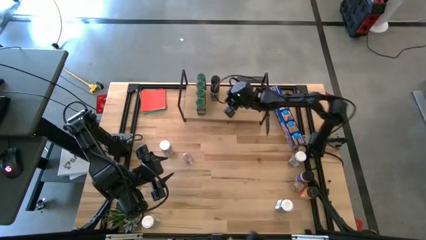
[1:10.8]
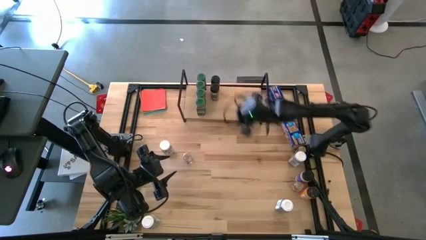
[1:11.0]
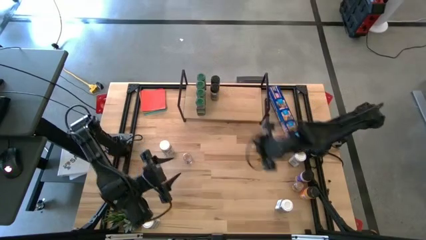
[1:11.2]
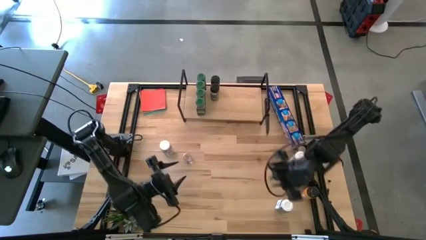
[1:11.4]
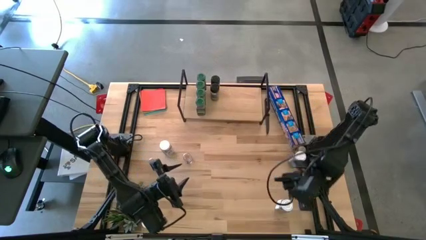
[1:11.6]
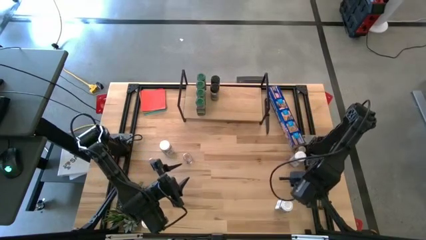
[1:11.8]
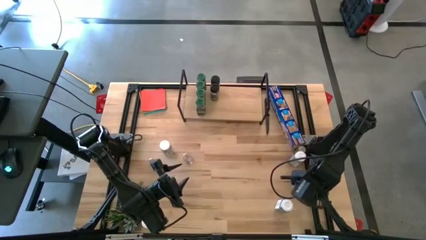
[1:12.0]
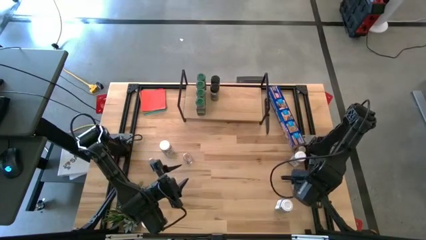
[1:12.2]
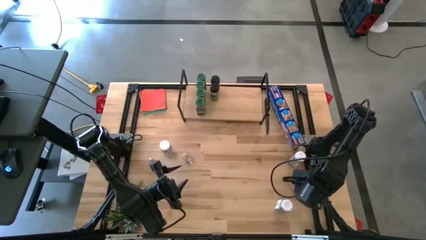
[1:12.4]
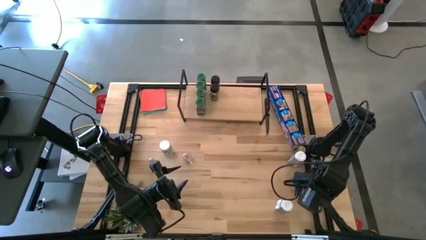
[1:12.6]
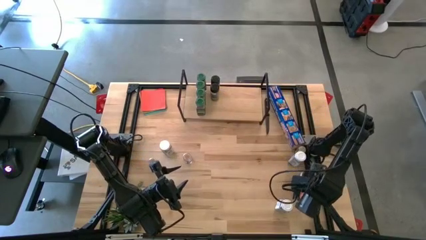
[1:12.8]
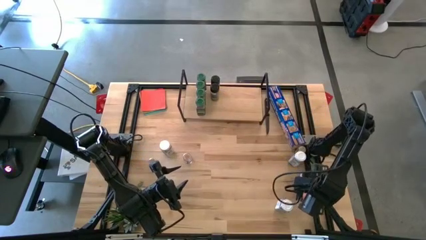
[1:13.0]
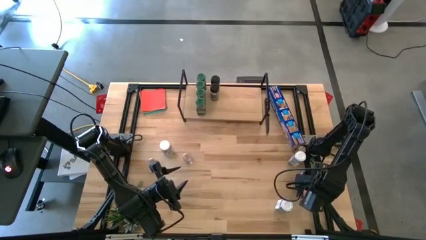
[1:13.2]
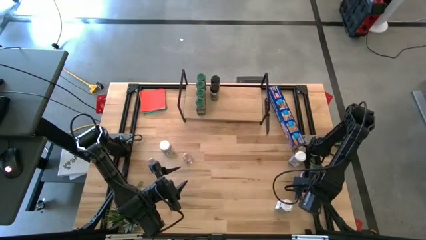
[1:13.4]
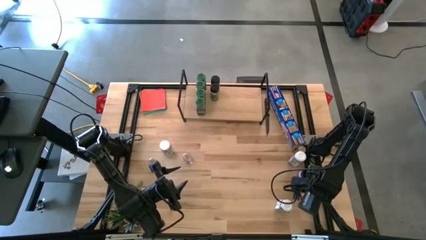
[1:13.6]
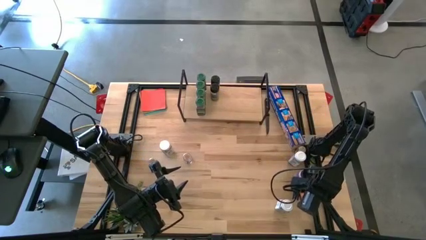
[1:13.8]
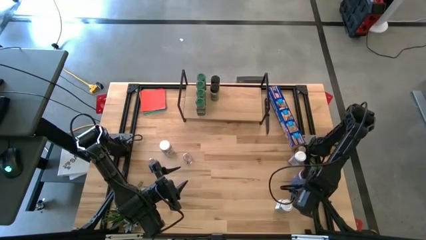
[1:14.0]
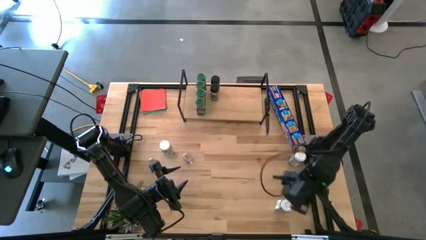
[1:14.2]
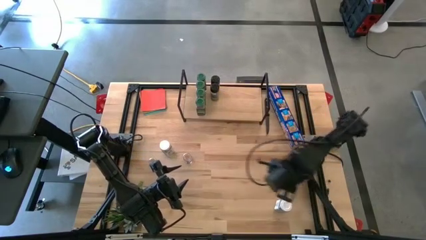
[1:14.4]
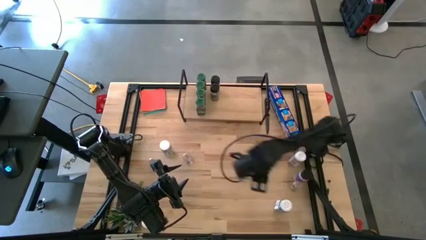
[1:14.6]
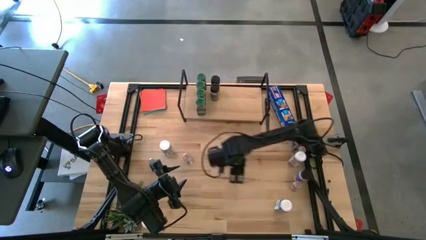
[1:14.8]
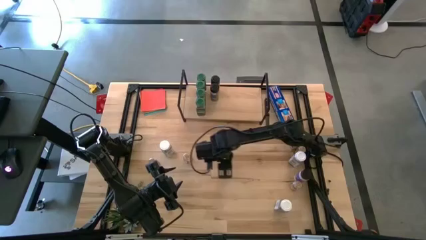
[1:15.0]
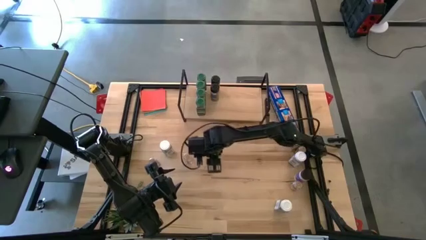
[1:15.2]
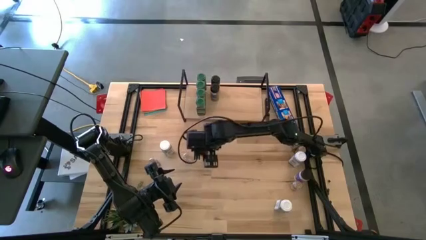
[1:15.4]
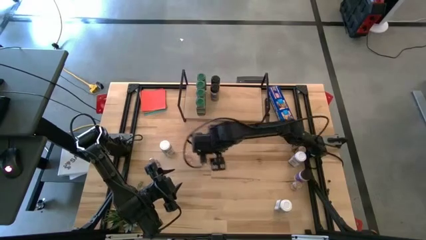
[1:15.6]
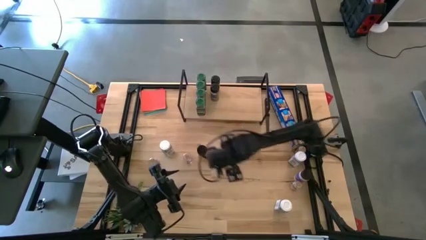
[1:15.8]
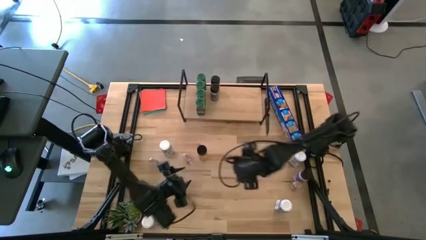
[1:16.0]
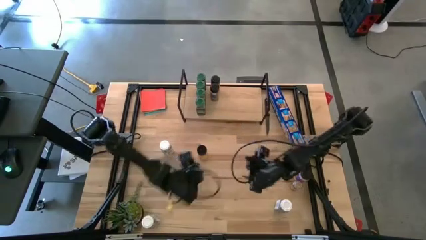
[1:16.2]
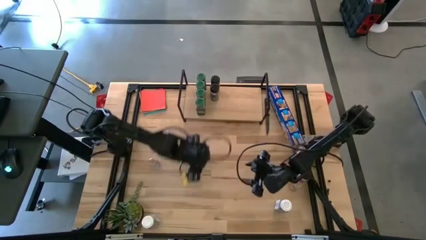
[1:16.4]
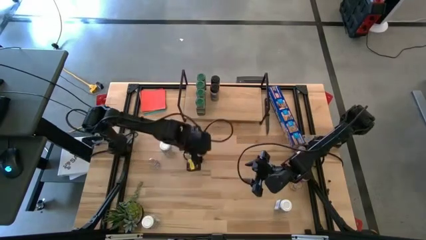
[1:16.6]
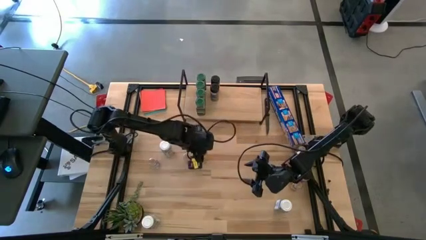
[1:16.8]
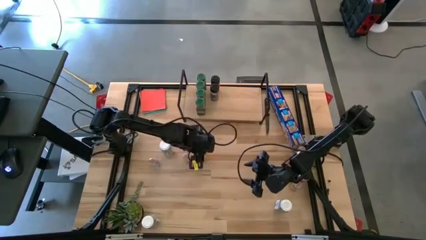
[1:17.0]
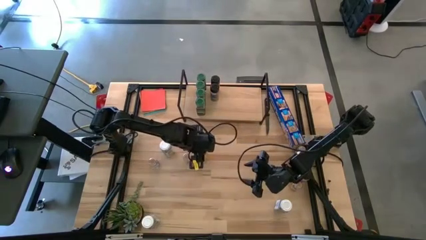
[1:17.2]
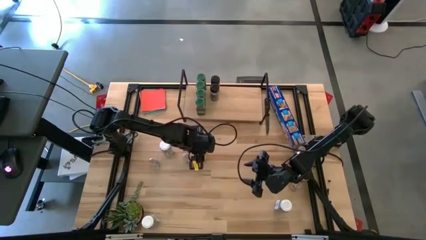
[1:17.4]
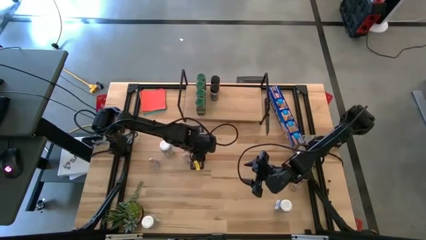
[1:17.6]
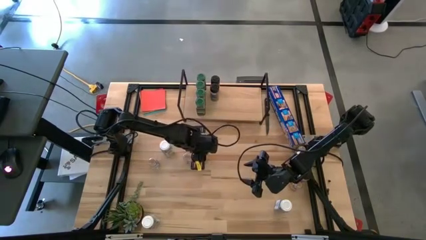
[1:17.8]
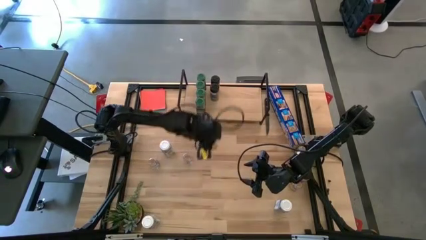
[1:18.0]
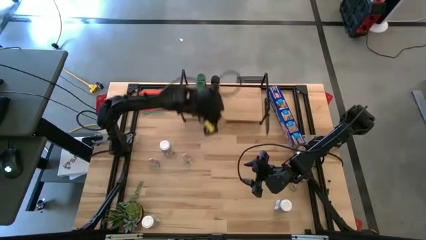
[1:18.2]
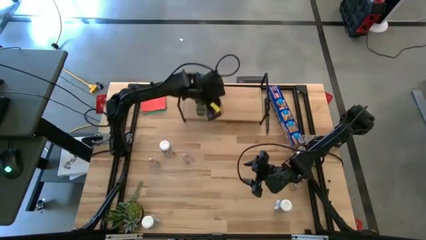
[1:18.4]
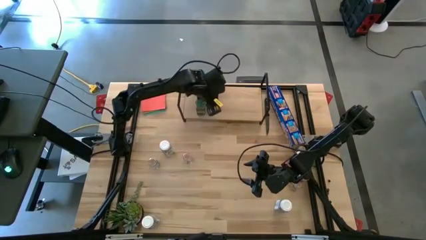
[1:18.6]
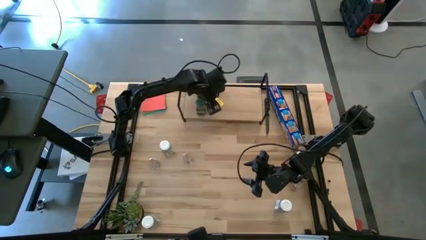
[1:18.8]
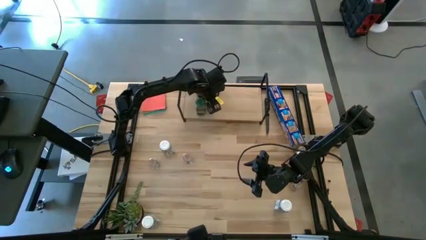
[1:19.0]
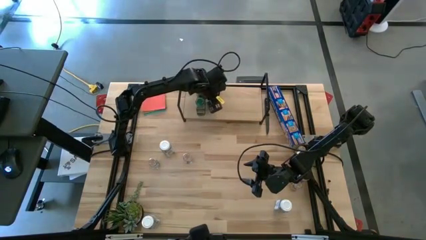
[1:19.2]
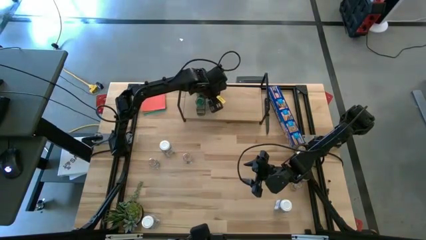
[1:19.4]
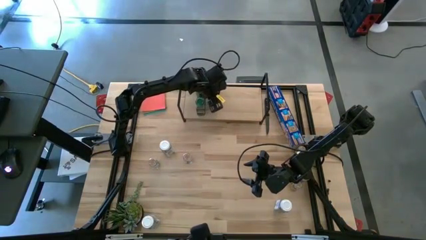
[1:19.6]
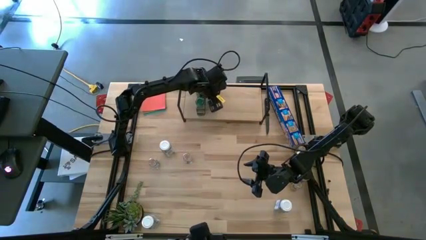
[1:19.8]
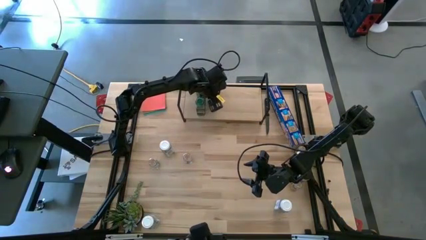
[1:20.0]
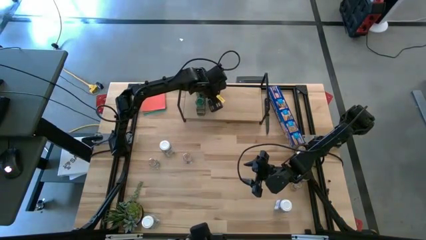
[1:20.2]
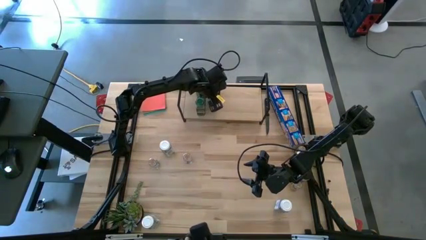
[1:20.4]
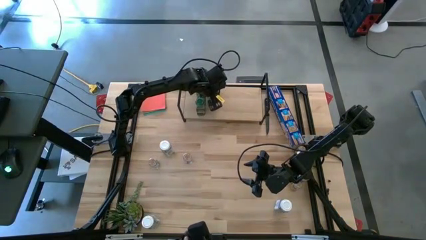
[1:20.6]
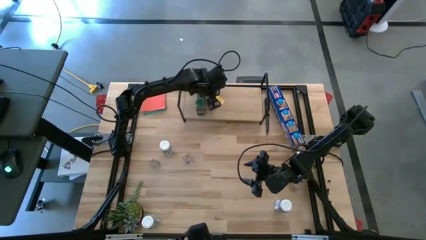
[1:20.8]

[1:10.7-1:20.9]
Task: Shelf spices
Put the bottom black seasoning bottle on the shelf aligned with the other black seasoning bottles

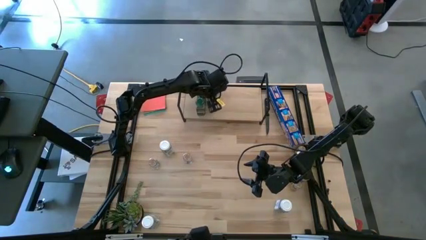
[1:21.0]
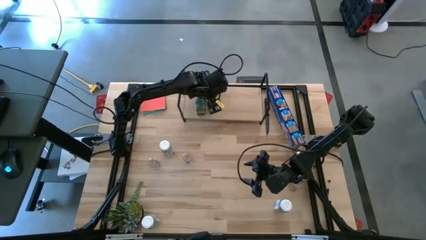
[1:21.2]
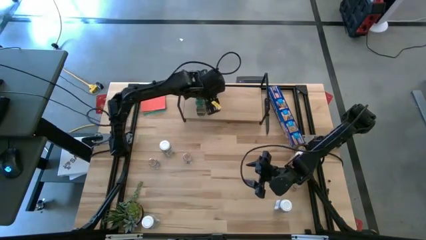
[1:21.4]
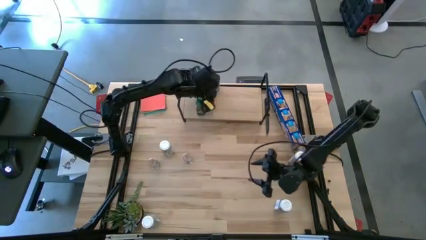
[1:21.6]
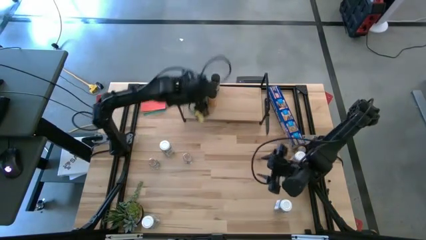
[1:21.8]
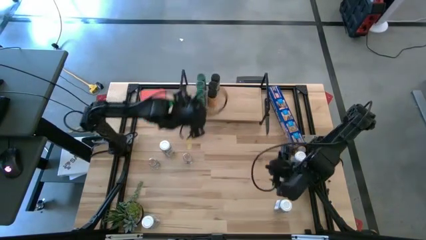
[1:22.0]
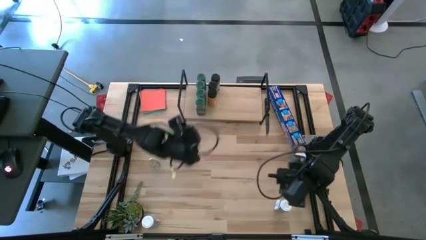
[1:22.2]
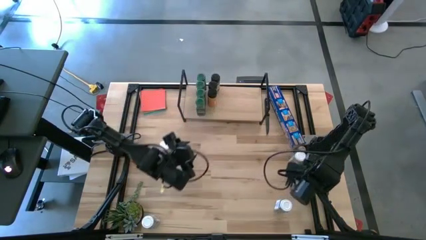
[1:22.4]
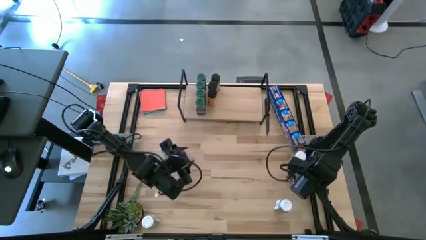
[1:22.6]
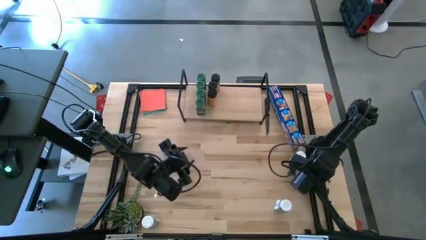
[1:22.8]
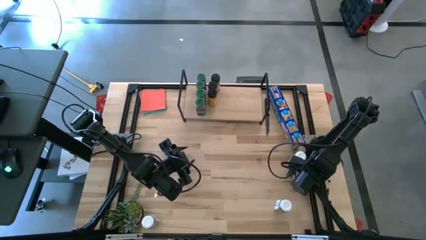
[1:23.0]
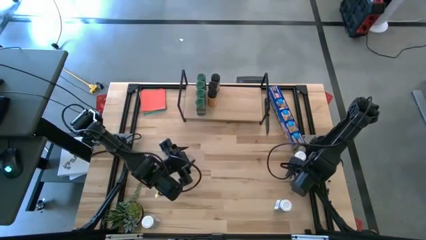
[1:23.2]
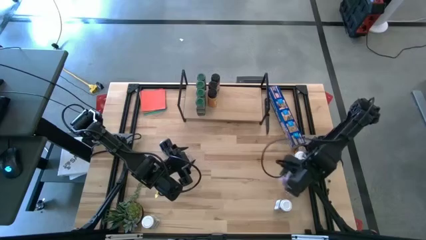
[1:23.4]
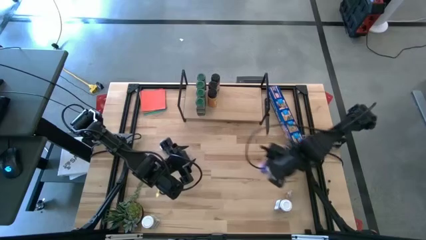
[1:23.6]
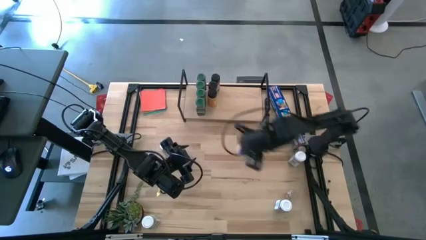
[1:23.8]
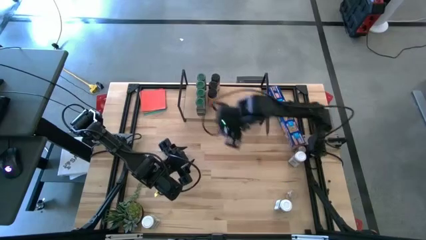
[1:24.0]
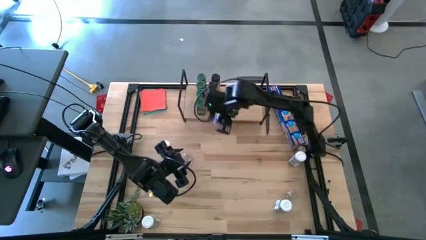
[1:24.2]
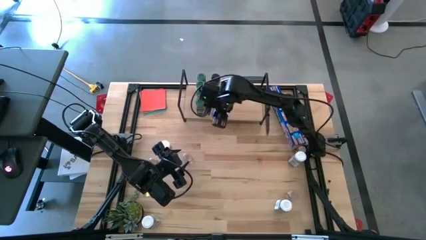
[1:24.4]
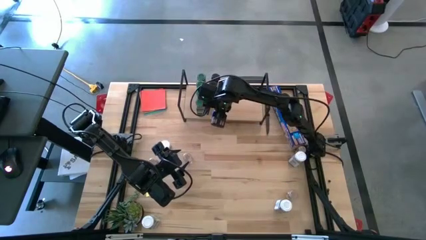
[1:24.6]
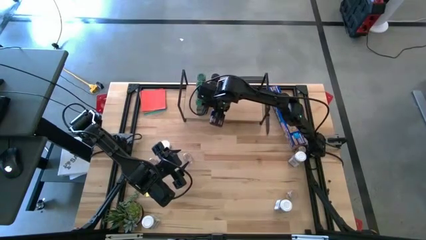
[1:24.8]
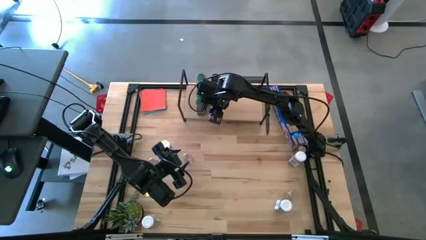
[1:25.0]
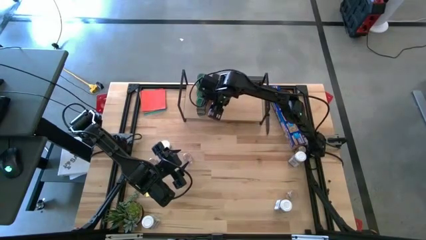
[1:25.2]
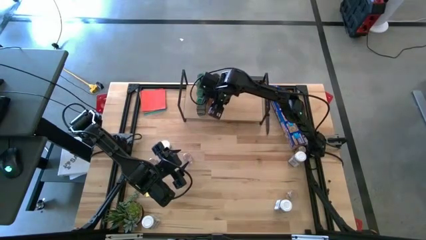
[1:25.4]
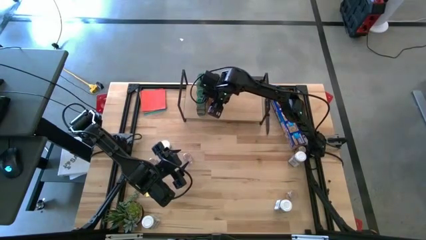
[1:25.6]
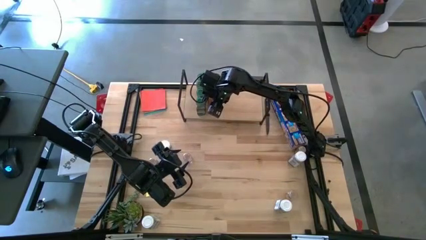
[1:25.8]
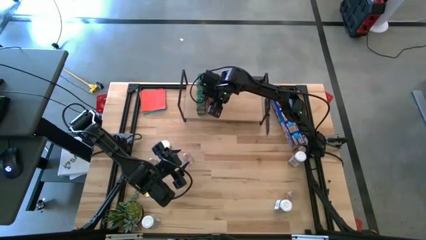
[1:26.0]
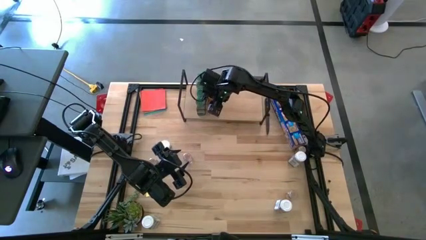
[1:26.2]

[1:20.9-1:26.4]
Put the black seasoning bottle on the shelf aligned with the other black seasoning bottles
